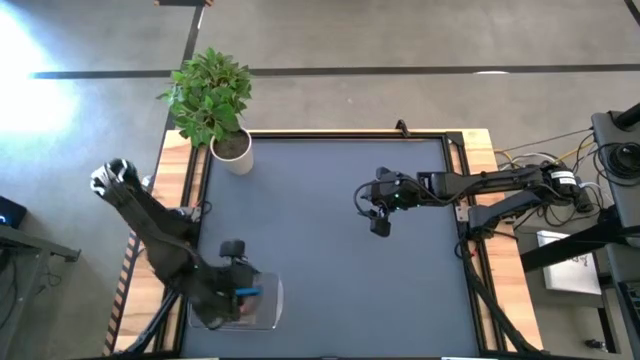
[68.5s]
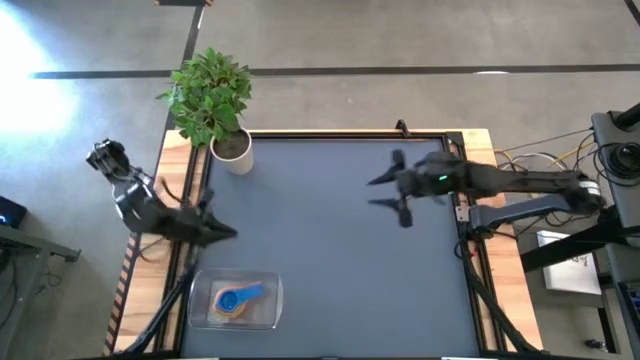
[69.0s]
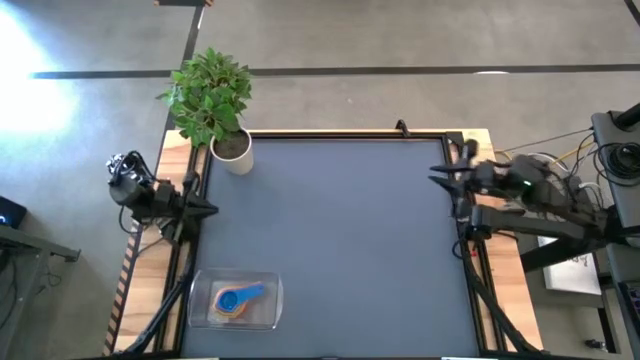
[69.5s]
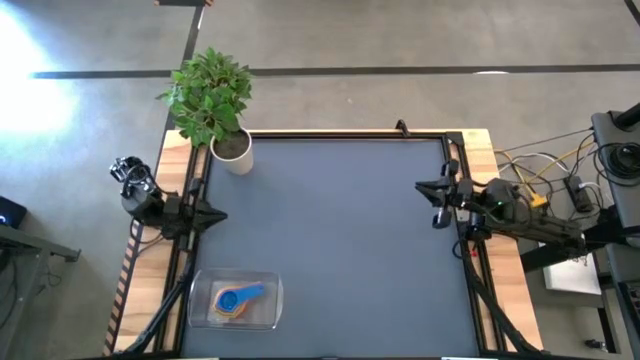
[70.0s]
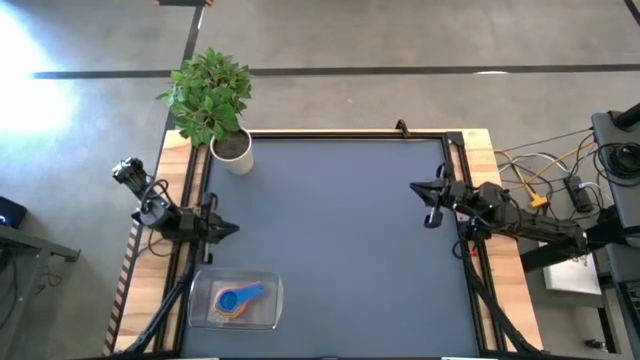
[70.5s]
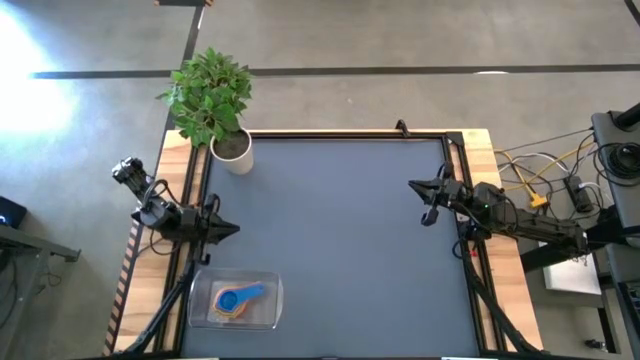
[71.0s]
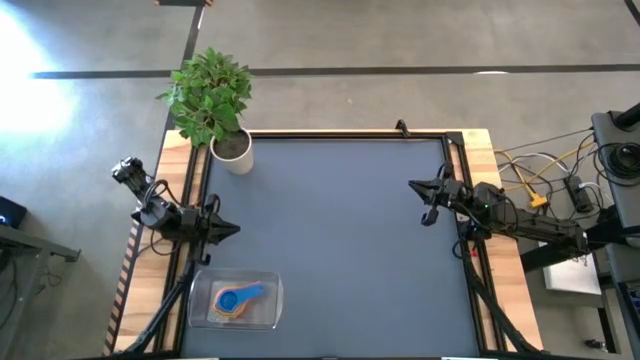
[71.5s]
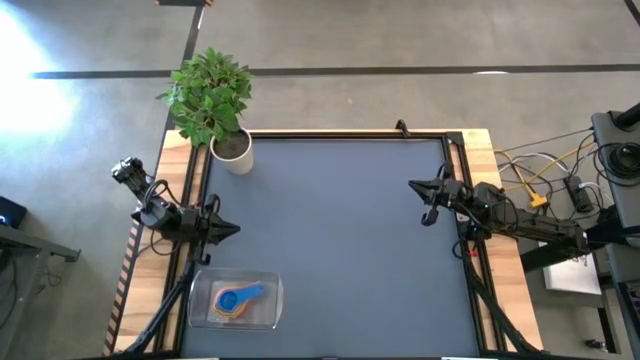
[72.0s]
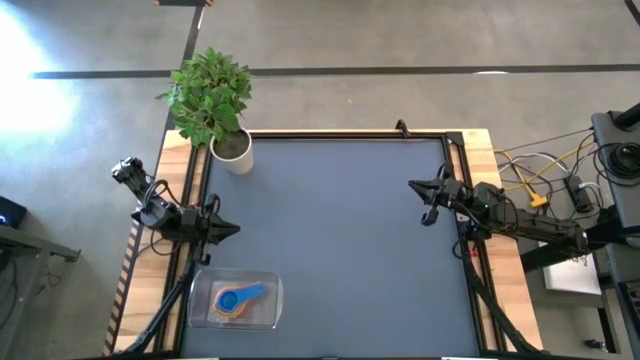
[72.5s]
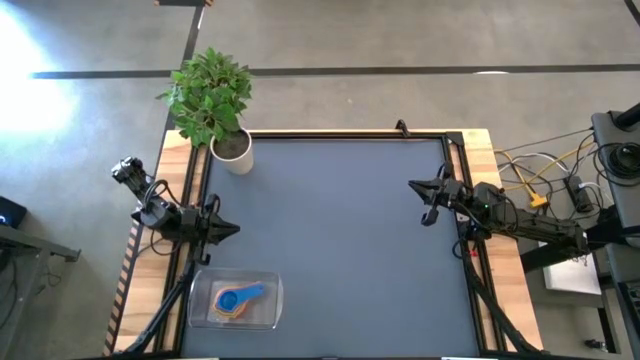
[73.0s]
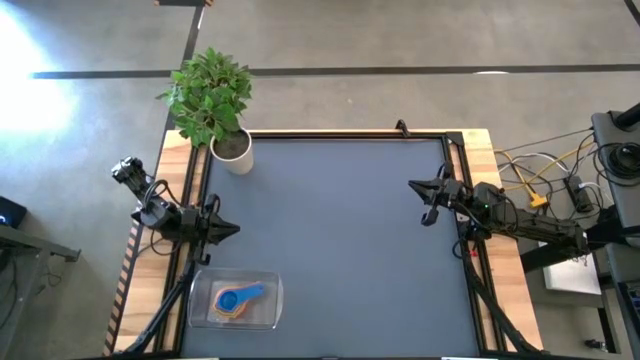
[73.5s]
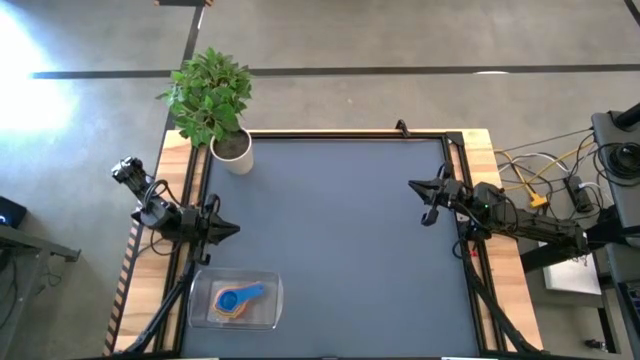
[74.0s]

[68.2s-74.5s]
Task: Nest measuring cups in basket
Return to Home Position

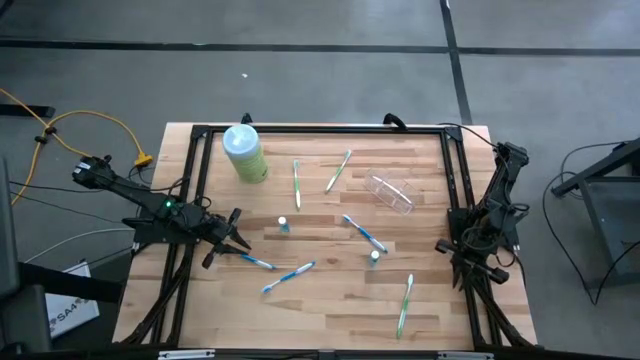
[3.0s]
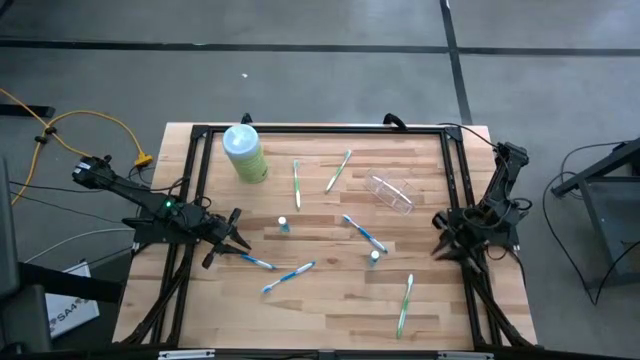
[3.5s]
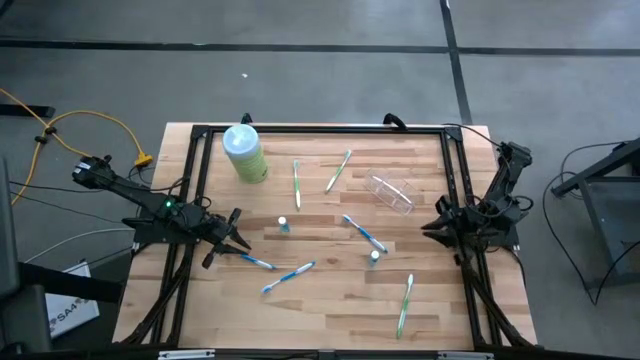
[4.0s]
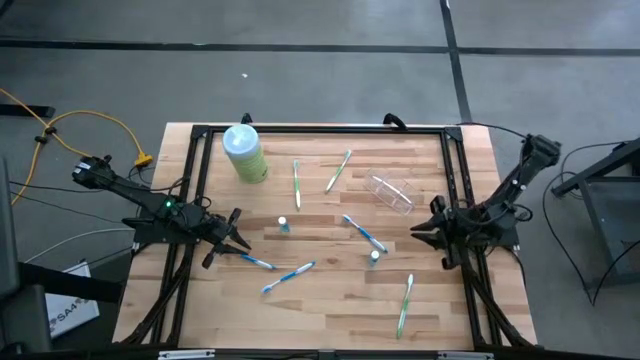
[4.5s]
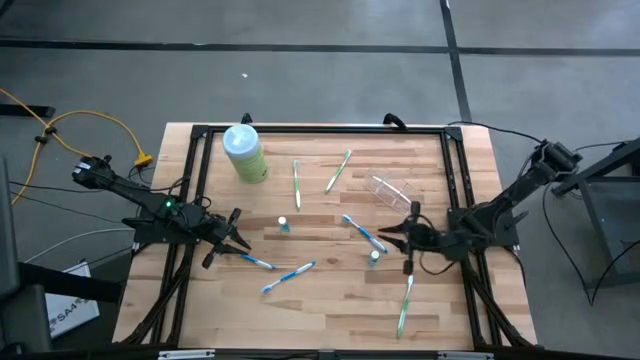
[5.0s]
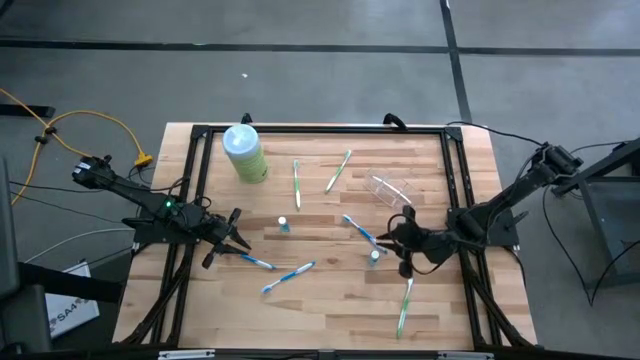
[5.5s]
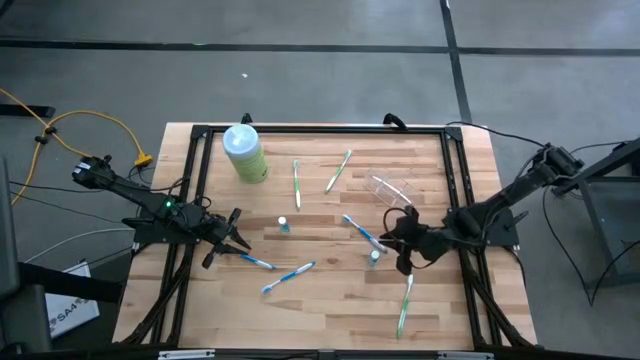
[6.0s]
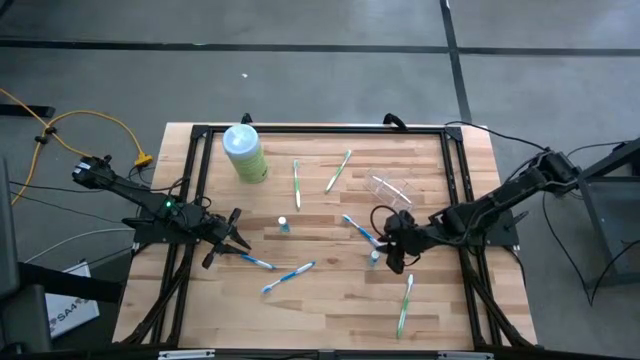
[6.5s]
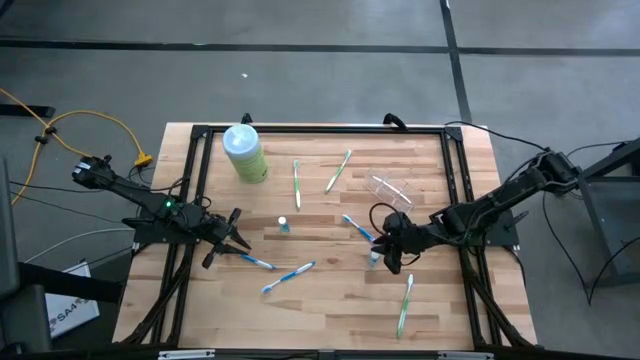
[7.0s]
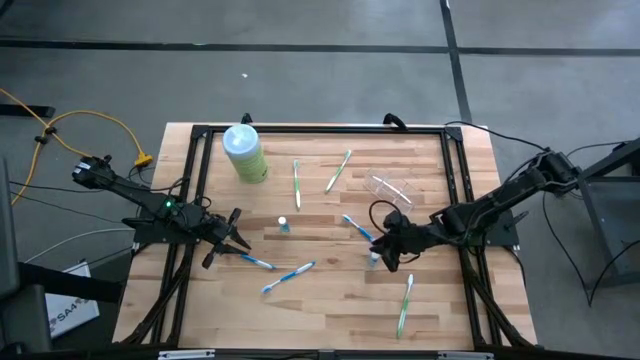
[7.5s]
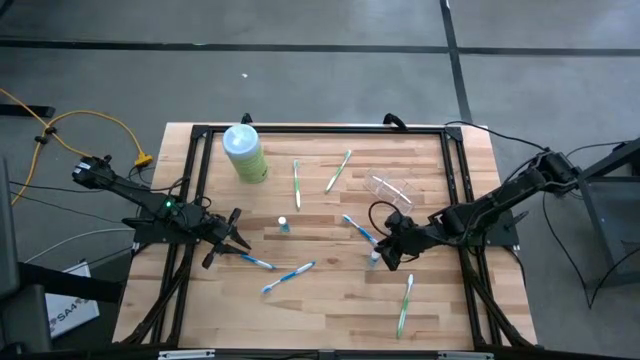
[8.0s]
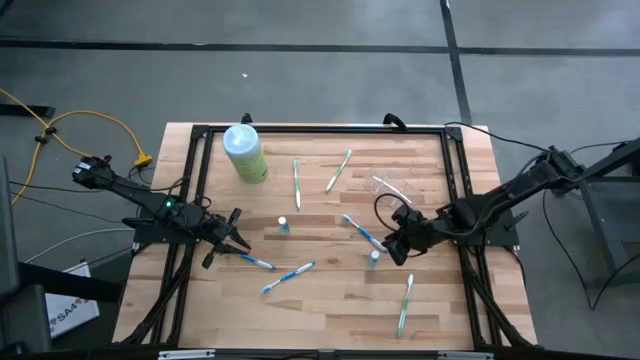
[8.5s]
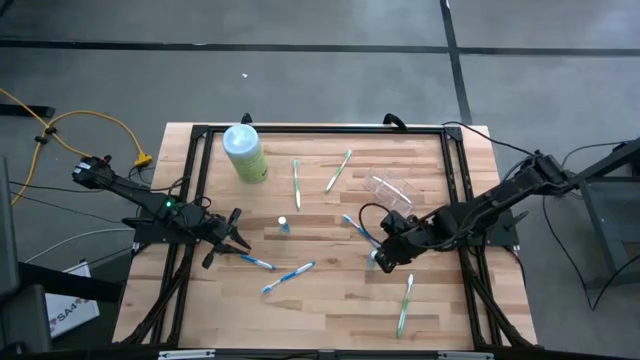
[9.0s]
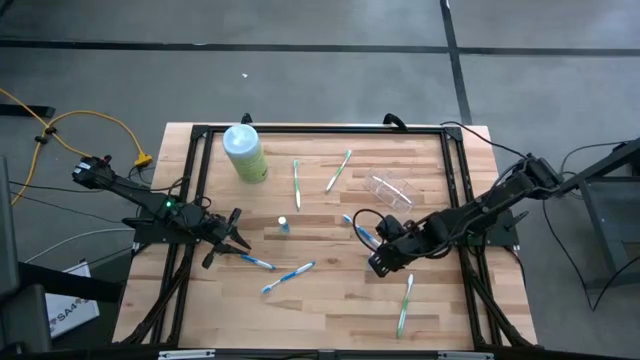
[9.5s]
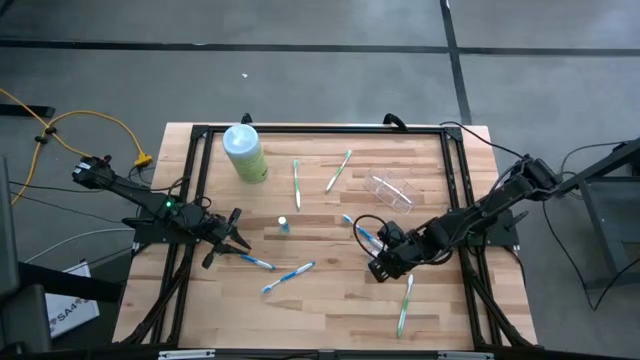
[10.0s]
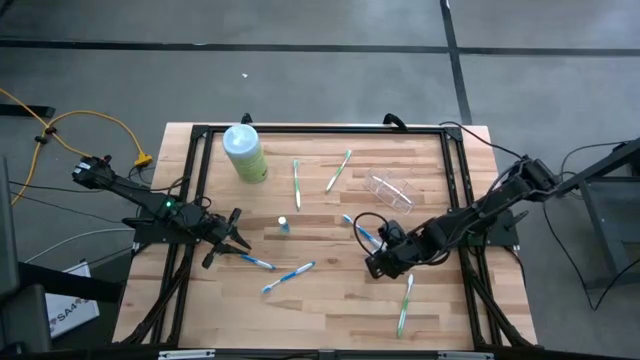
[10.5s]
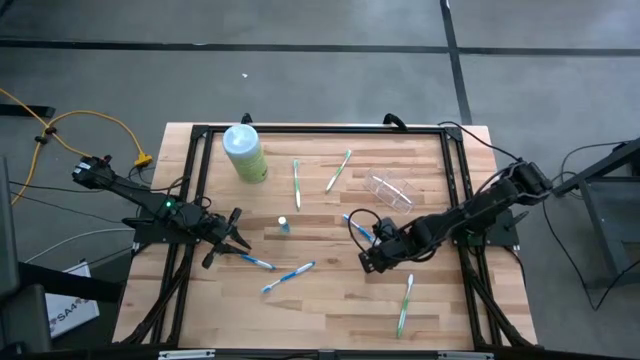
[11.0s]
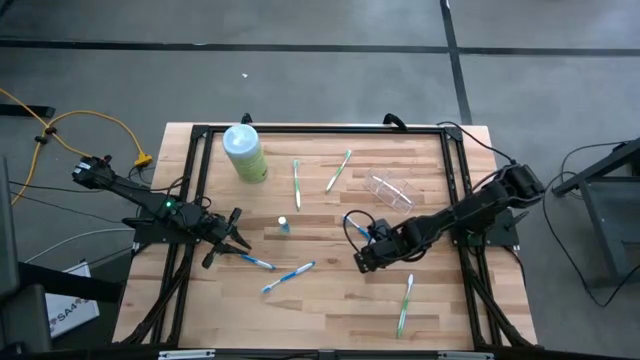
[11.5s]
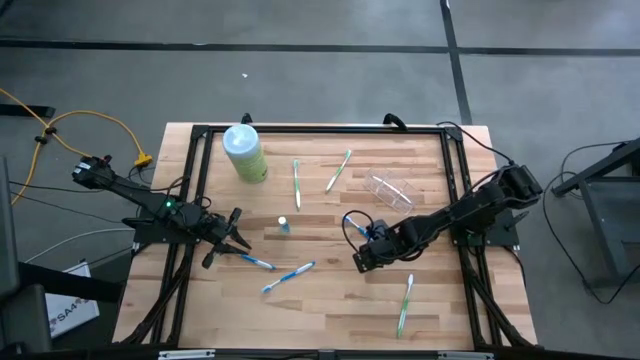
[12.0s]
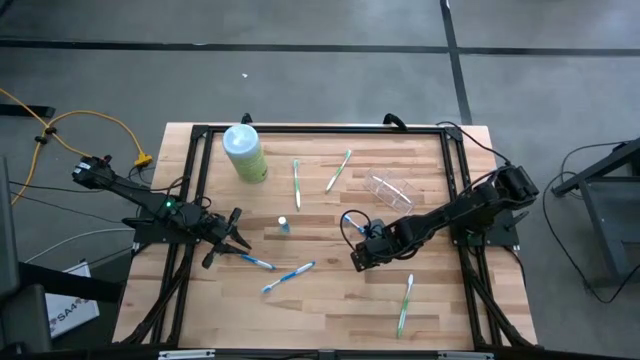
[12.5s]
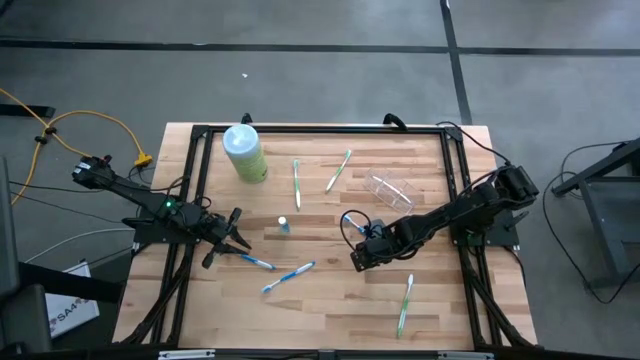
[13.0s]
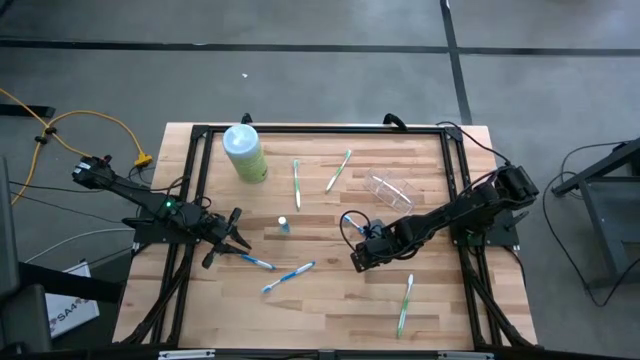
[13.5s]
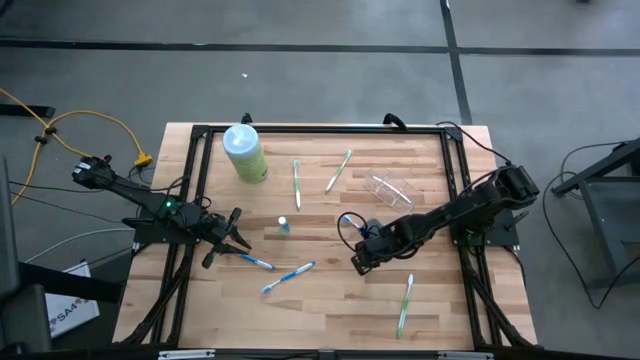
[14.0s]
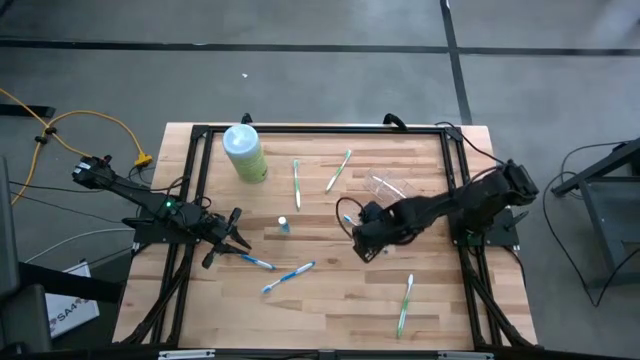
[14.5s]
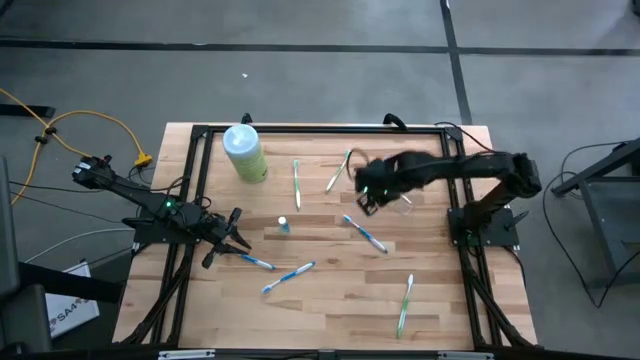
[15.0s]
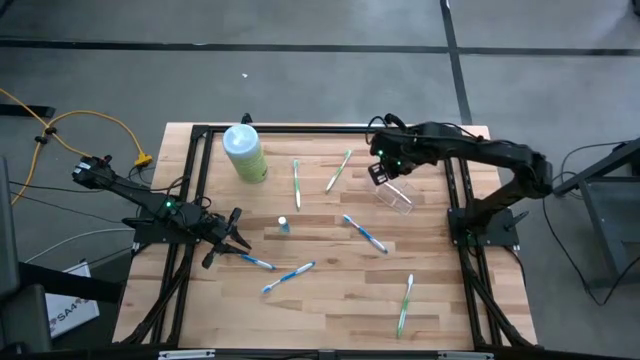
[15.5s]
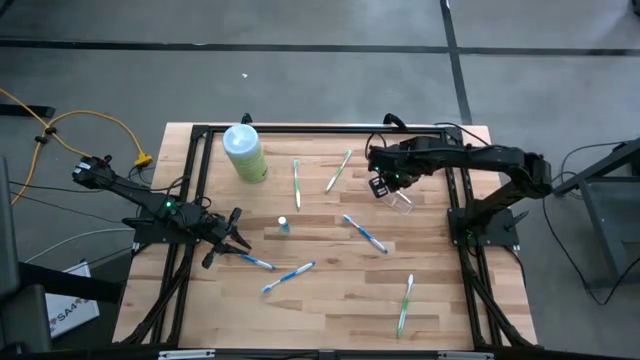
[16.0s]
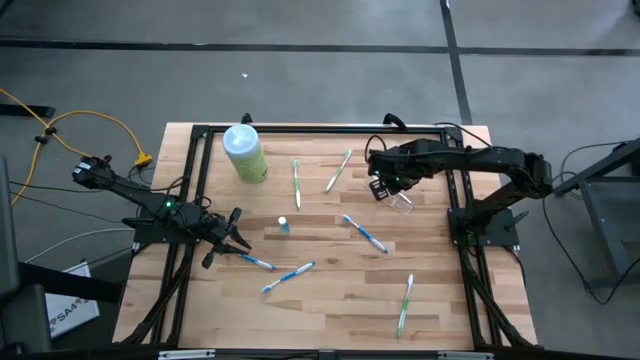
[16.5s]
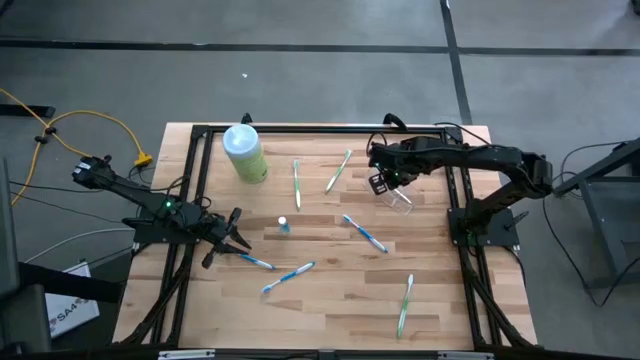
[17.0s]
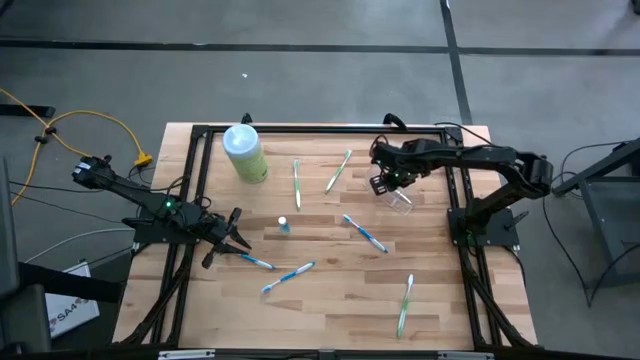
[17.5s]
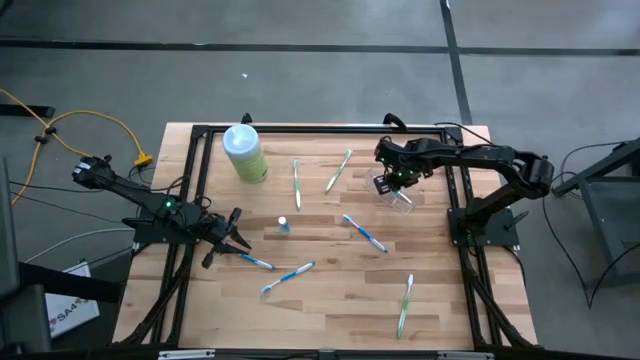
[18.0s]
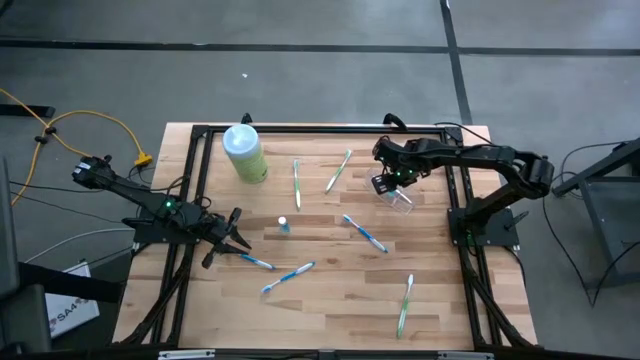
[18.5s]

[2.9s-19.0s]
Task: Pick & Place toothbrushing station
Put the right blue mouthwash into the middle of the transparent organizer
